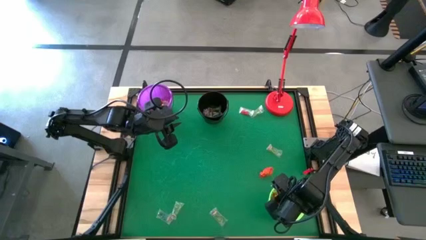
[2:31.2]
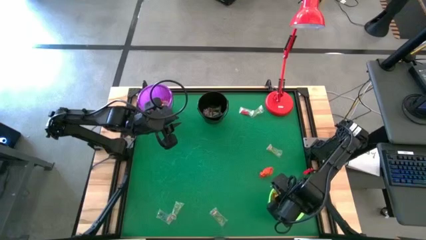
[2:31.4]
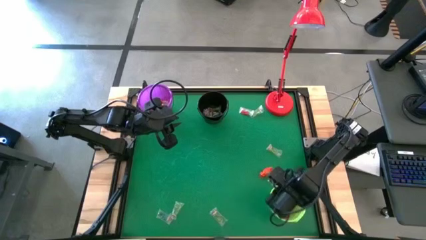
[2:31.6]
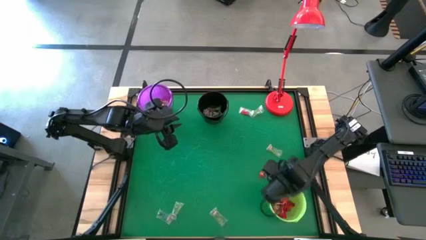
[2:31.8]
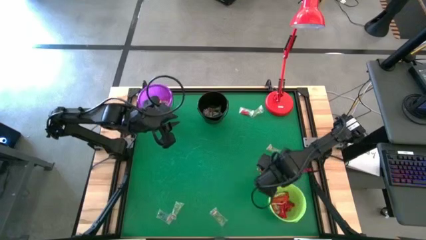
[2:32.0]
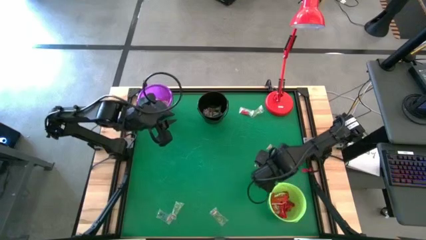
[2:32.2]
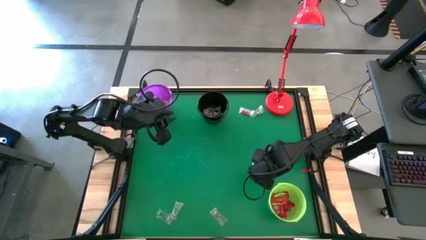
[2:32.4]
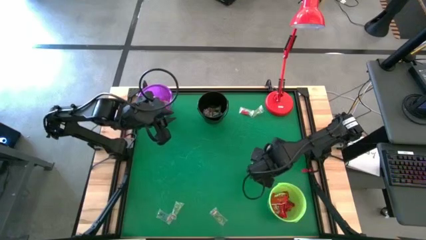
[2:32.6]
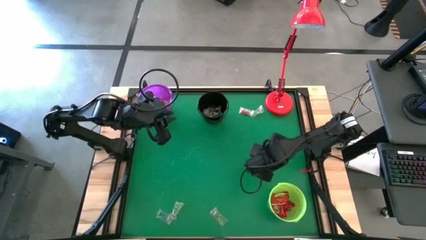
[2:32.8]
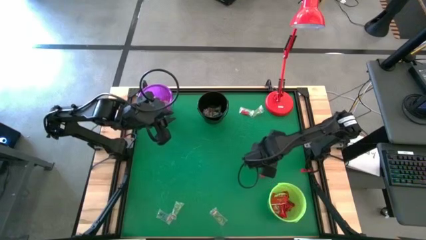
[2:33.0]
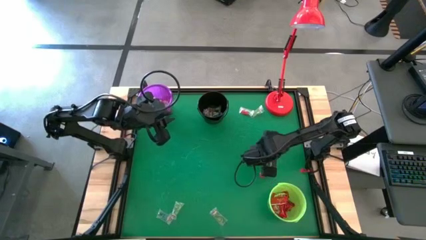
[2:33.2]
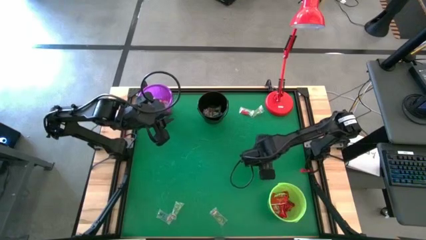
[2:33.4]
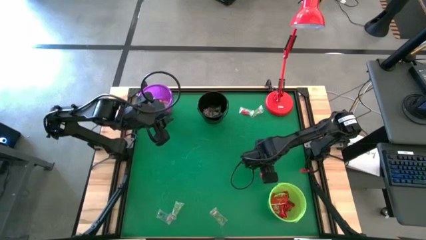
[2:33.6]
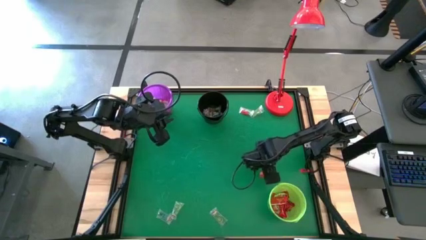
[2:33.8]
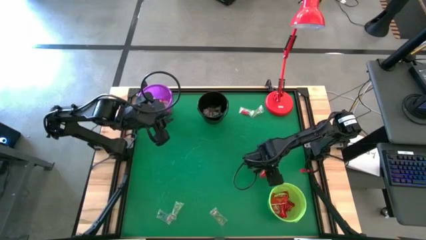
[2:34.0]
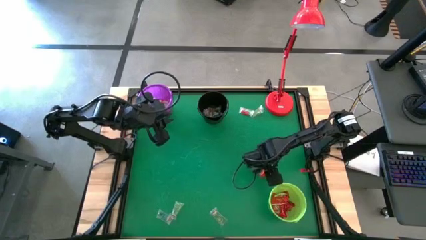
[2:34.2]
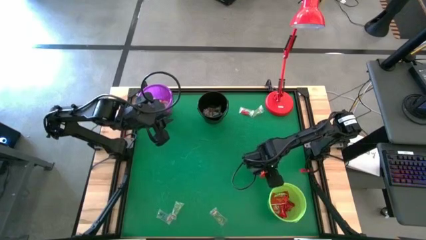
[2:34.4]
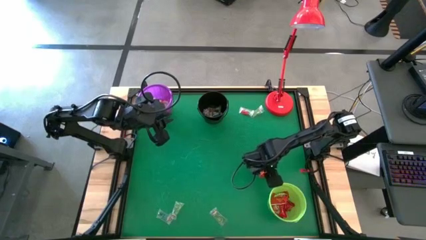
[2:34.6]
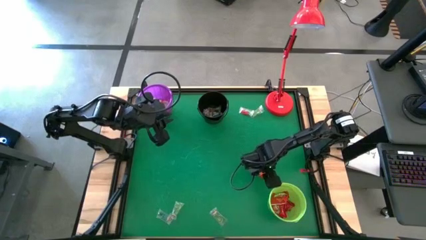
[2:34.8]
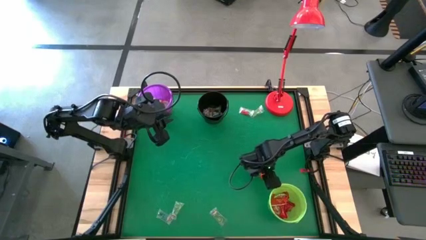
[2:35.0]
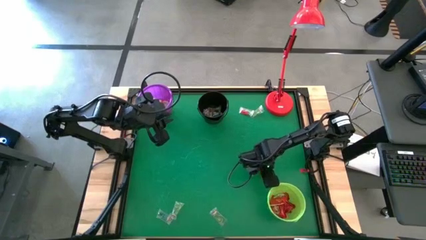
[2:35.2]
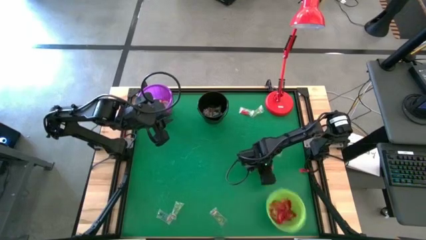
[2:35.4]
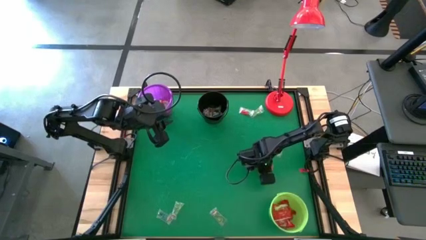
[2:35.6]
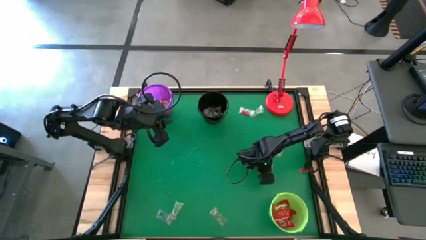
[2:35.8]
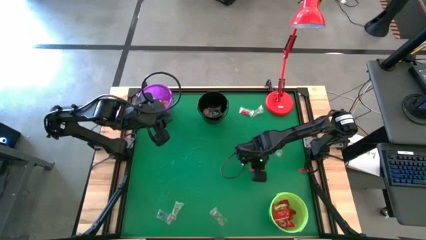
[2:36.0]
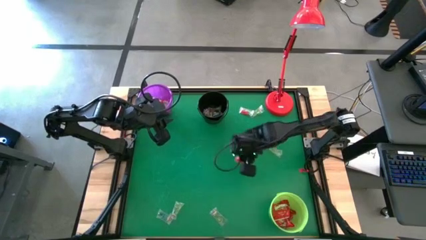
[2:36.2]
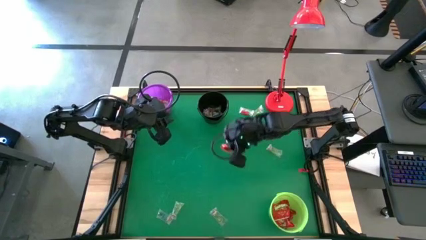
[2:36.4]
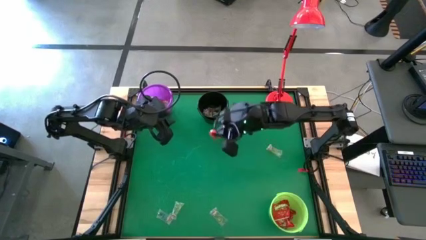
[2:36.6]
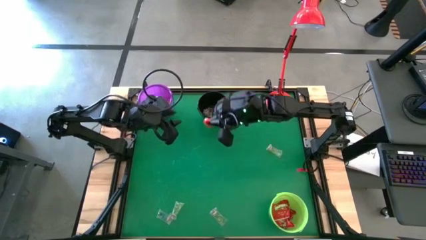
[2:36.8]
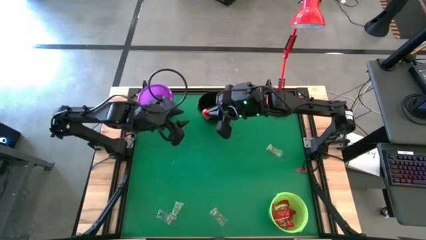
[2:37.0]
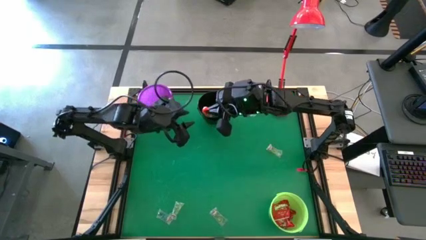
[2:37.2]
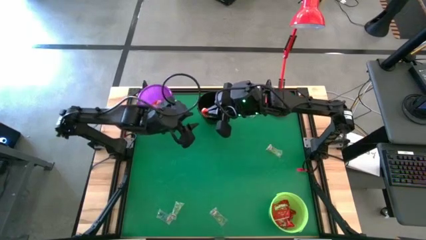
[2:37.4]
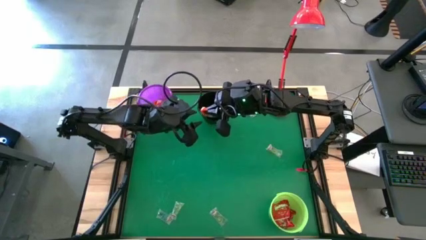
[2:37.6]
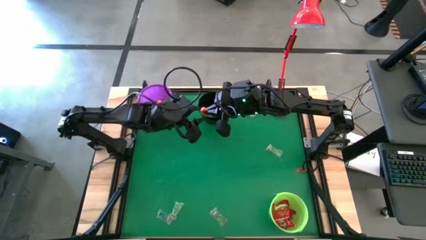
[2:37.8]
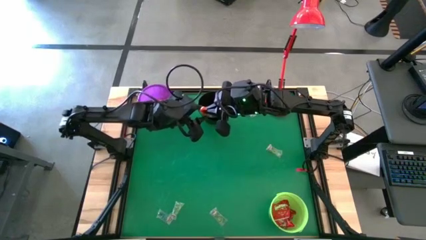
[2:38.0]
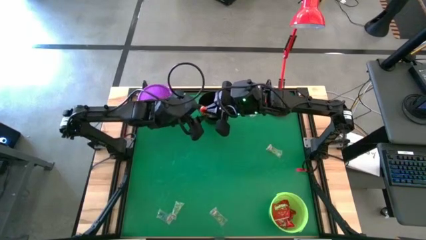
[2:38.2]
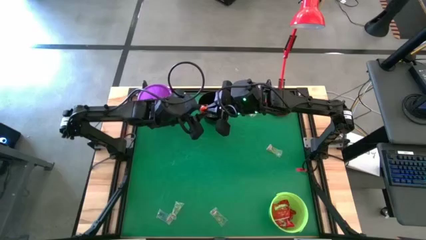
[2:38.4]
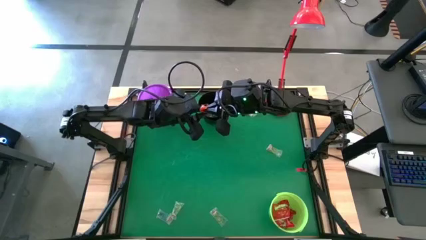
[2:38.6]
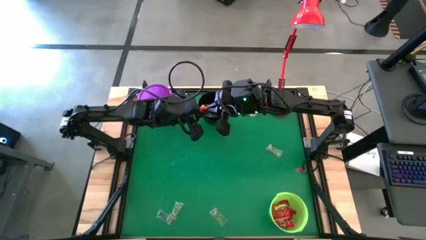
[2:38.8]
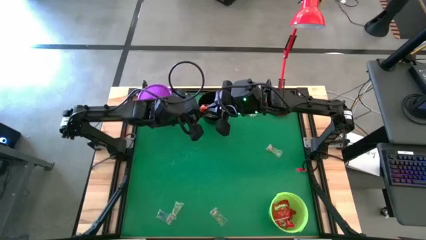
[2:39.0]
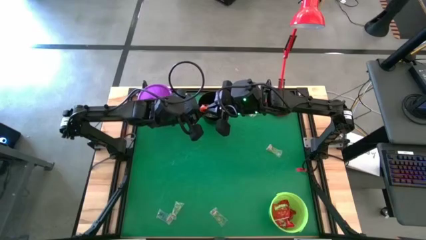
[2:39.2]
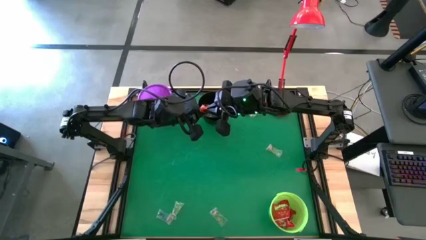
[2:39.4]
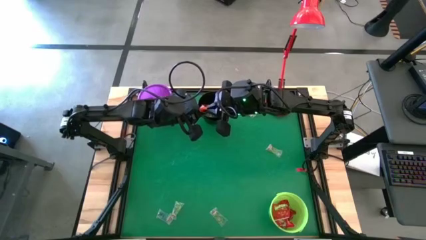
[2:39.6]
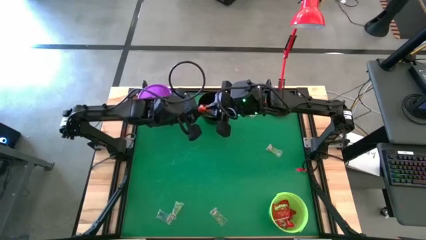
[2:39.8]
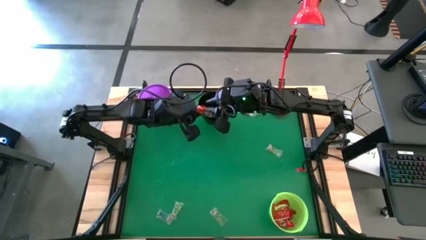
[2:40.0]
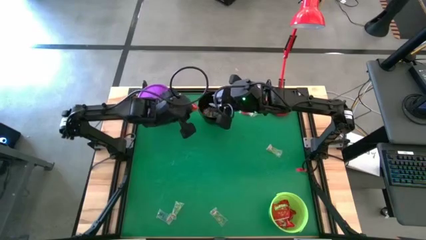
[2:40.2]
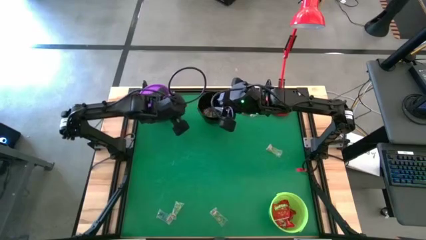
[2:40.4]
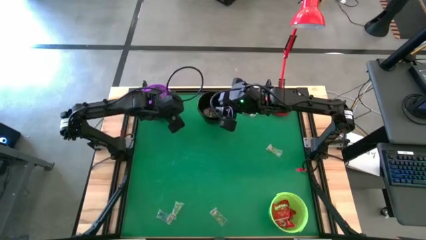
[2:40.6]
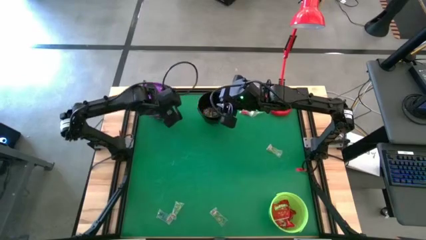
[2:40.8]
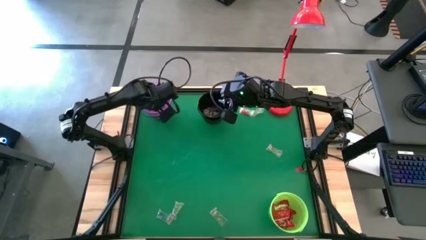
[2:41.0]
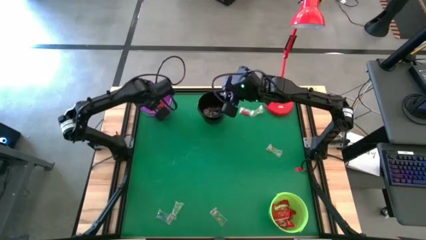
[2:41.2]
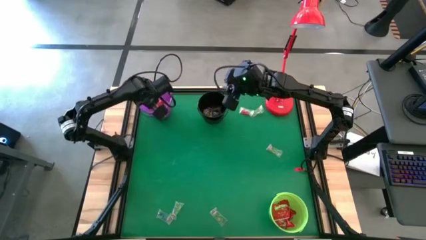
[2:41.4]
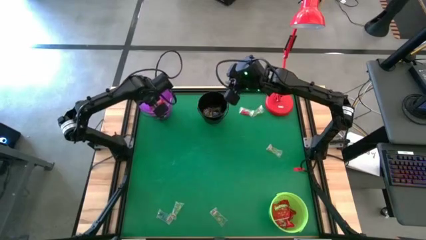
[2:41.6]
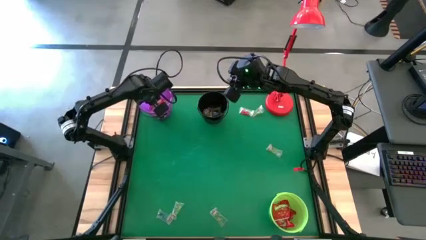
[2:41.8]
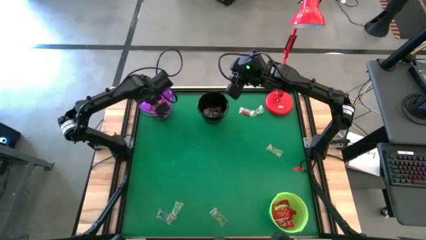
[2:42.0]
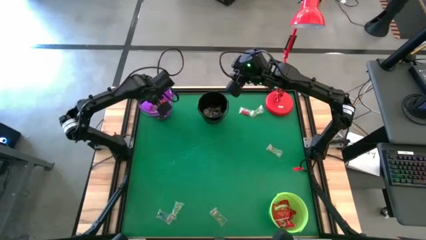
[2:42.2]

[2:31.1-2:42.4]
Task: Sort candy
Put the orange chocolate bar into the purple bucket

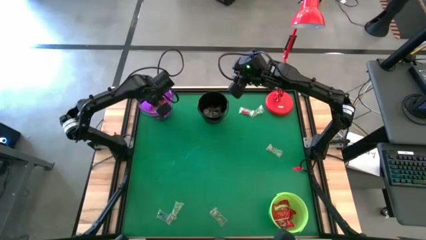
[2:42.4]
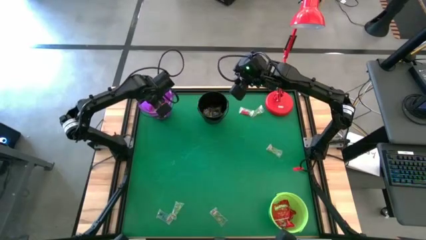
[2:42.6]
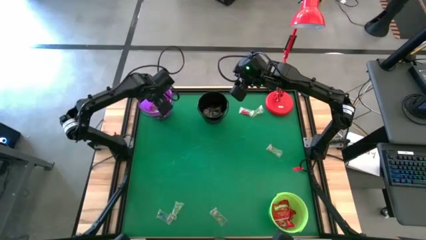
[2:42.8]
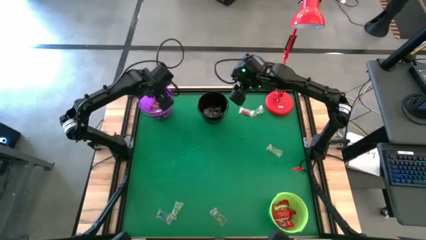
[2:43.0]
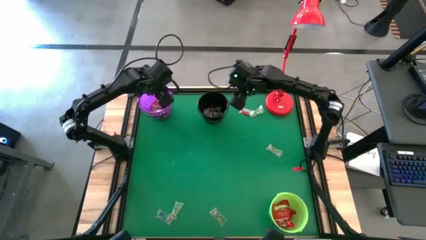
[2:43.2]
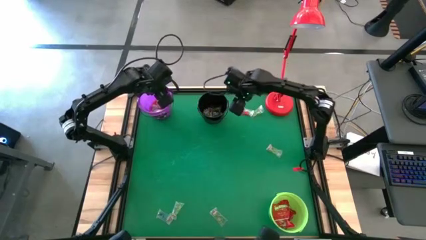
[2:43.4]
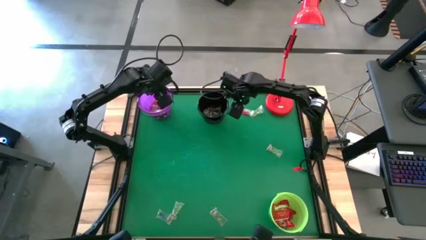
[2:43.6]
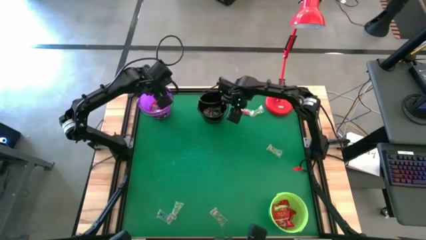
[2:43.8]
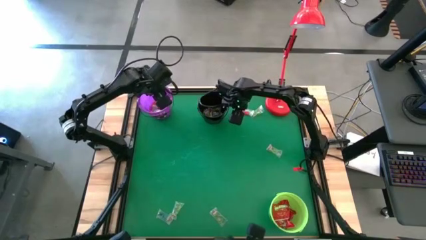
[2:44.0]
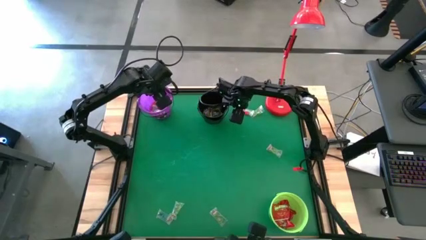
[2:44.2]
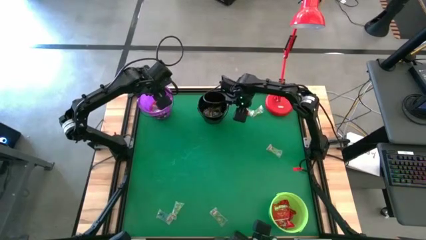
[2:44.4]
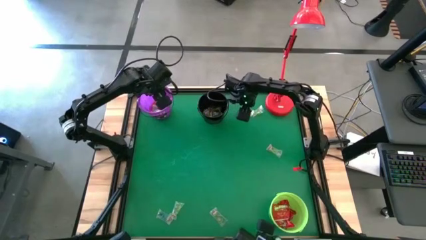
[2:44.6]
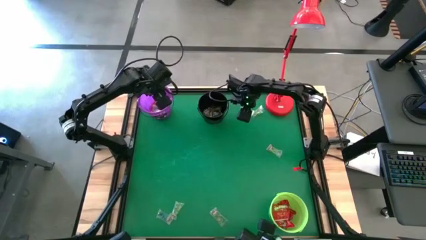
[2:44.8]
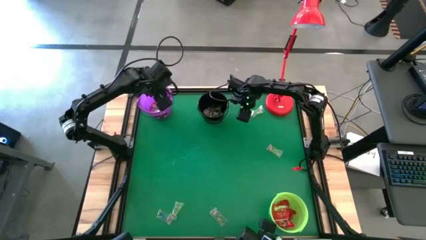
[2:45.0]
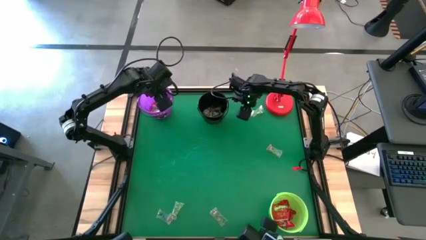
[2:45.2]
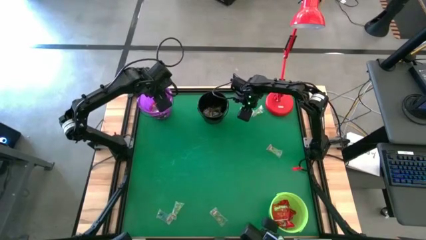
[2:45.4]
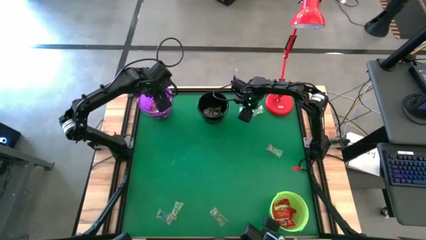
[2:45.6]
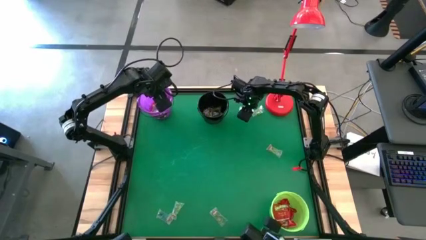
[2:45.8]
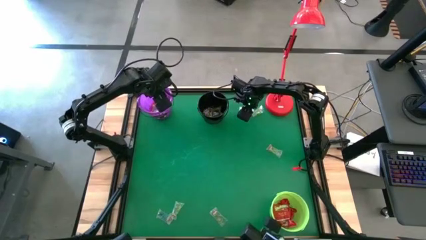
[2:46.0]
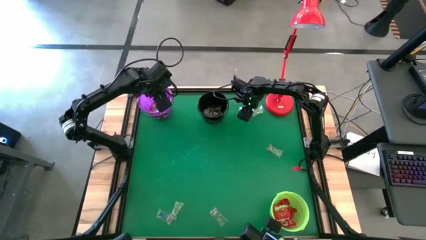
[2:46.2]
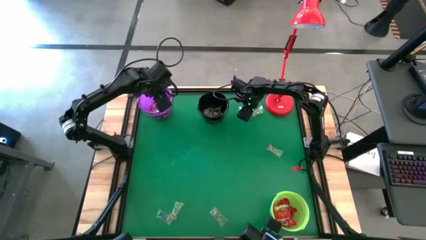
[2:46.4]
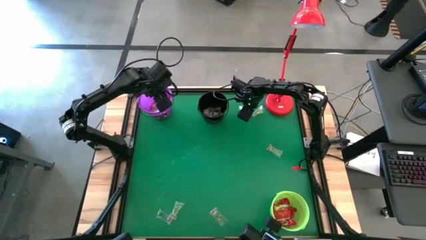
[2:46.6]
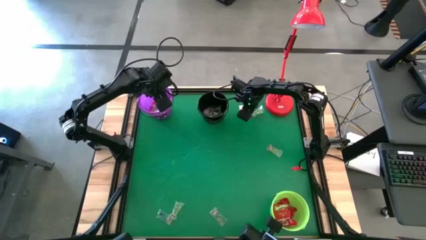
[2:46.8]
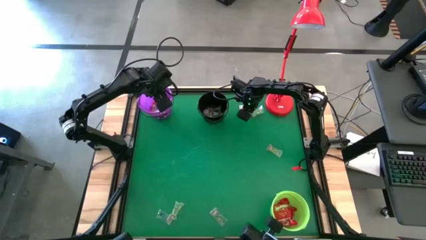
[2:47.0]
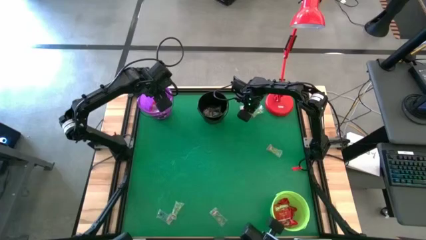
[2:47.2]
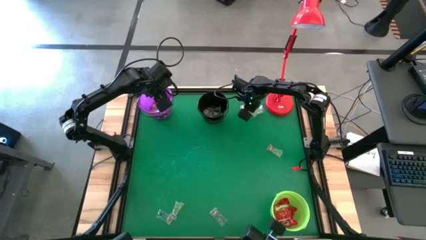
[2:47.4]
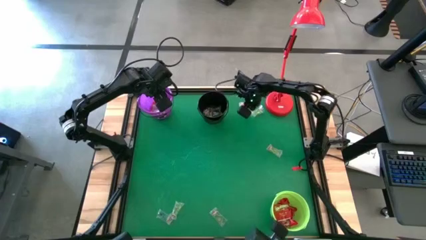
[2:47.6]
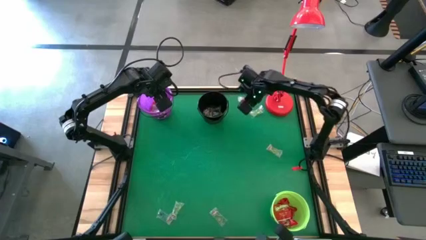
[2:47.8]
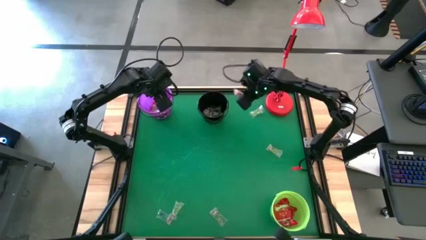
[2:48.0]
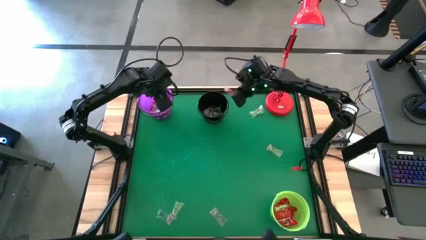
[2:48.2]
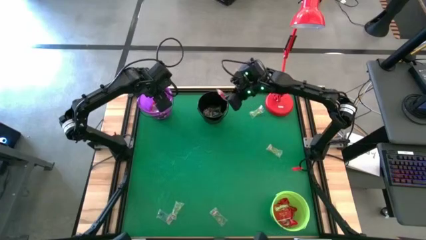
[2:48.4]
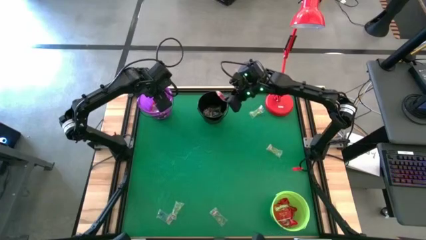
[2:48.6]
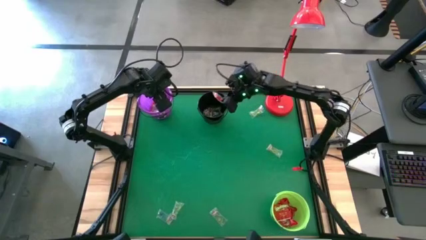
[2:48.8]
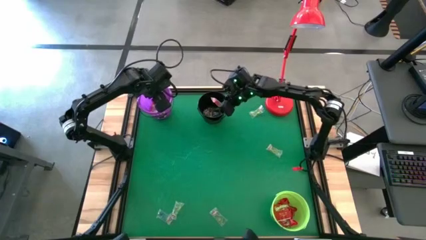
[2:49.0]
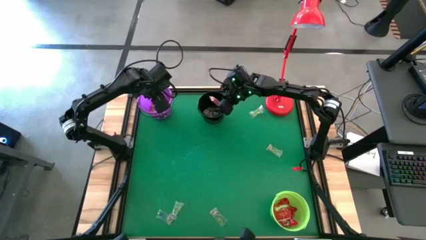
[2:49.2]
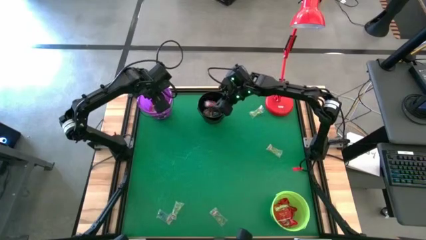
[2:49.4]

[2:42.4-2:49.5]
Put the red gummy into the black bucket
